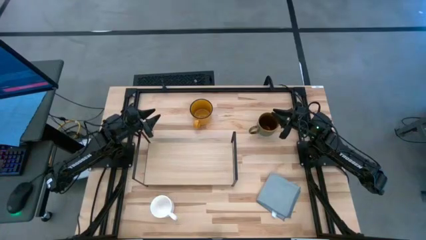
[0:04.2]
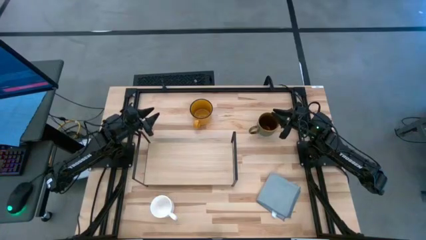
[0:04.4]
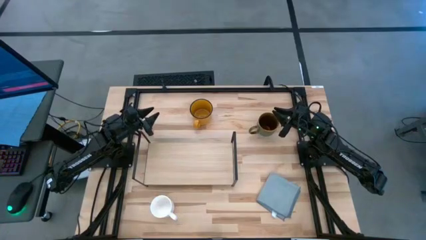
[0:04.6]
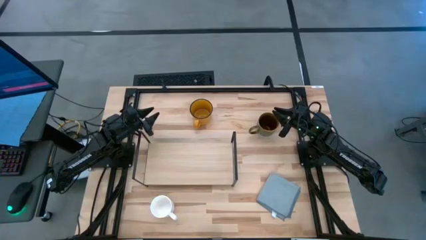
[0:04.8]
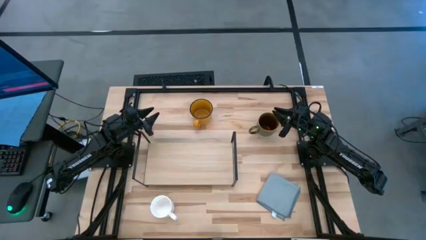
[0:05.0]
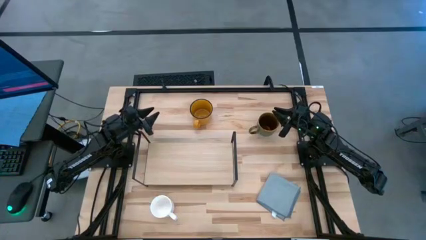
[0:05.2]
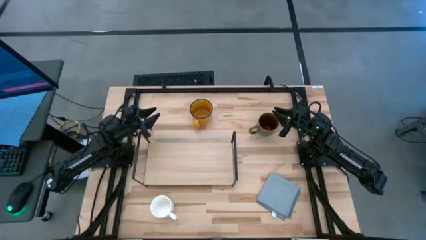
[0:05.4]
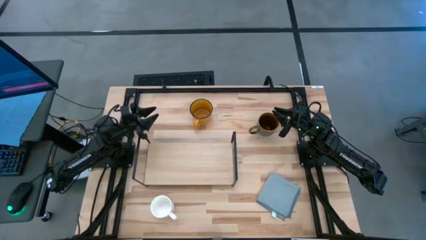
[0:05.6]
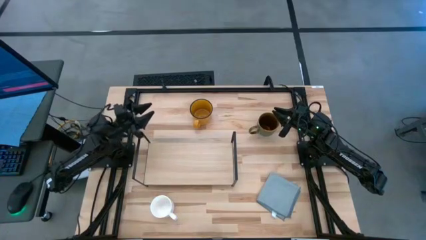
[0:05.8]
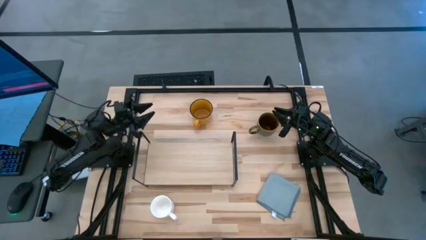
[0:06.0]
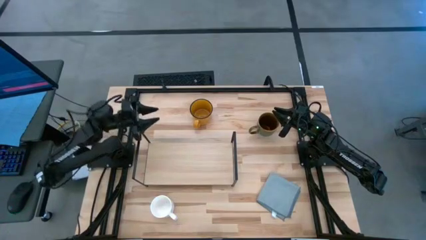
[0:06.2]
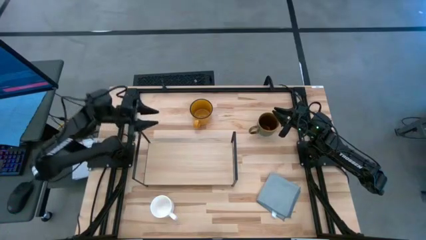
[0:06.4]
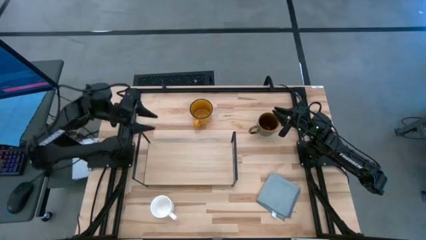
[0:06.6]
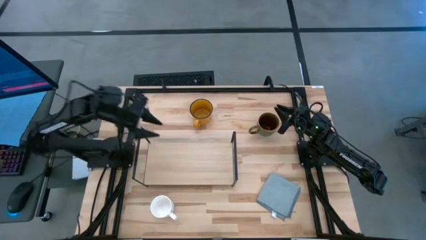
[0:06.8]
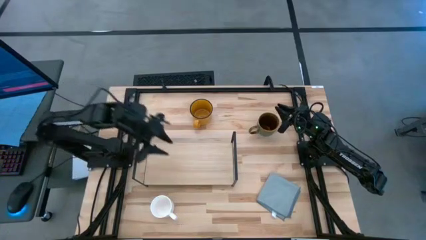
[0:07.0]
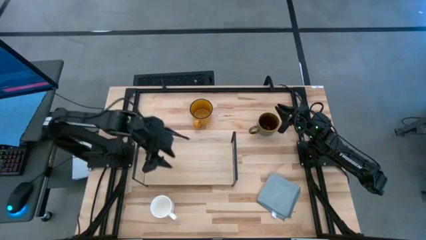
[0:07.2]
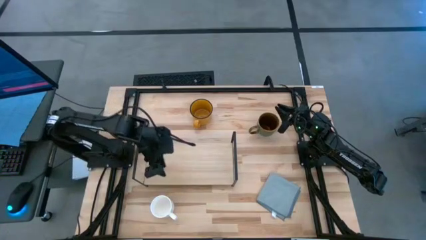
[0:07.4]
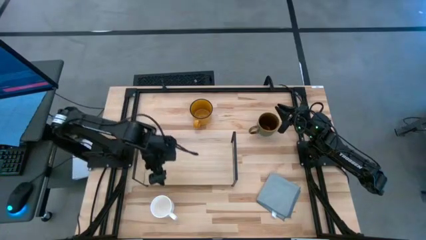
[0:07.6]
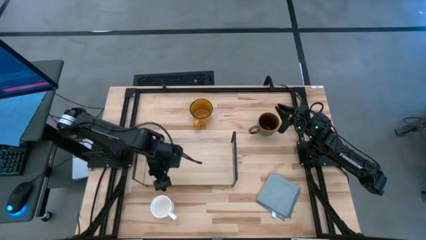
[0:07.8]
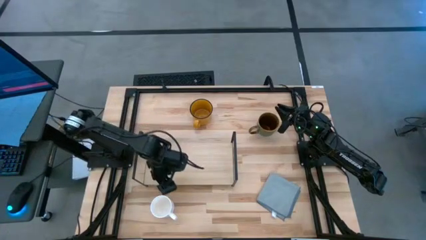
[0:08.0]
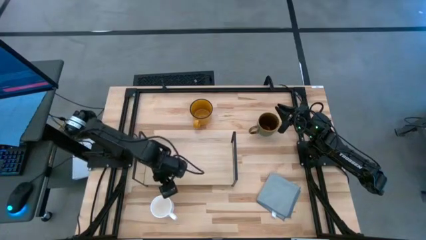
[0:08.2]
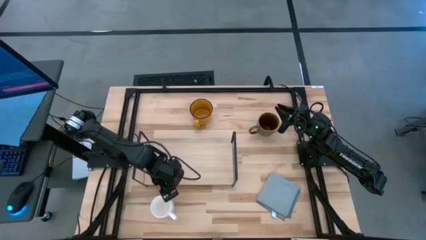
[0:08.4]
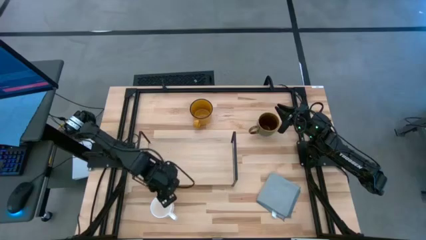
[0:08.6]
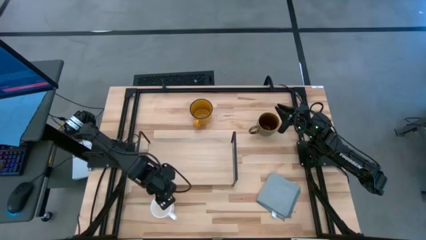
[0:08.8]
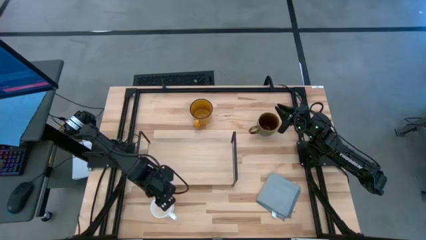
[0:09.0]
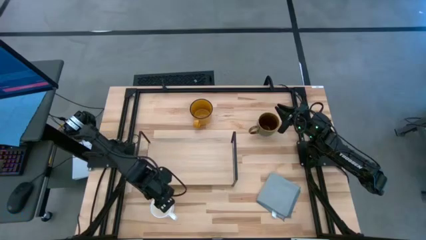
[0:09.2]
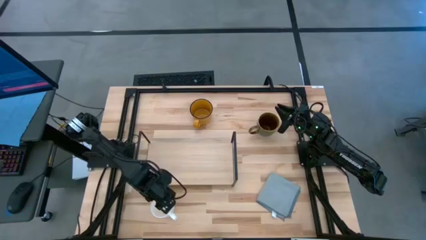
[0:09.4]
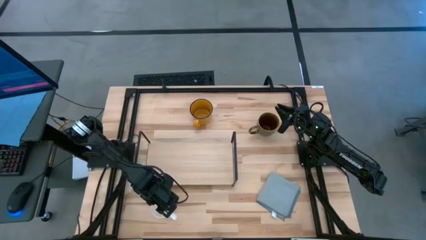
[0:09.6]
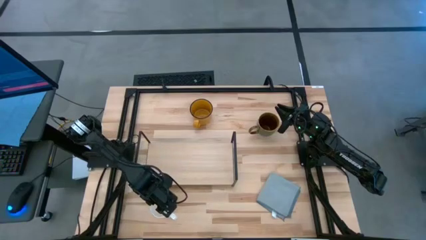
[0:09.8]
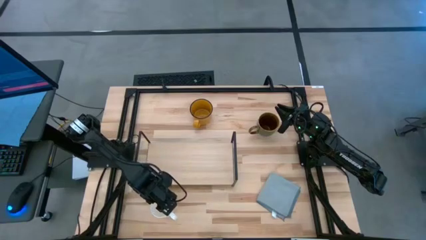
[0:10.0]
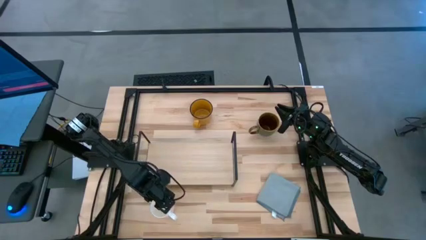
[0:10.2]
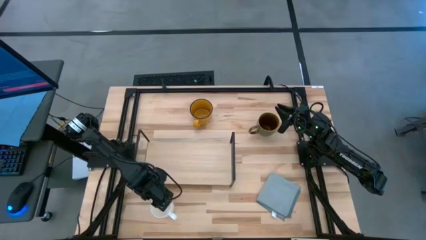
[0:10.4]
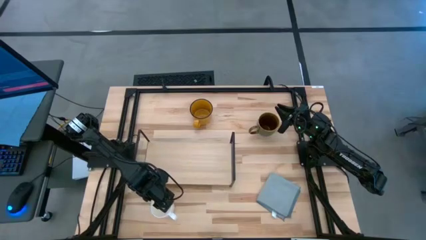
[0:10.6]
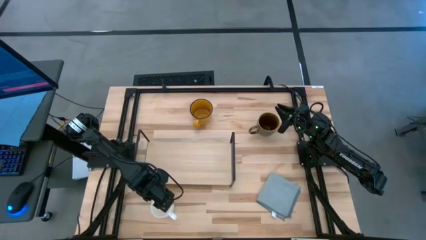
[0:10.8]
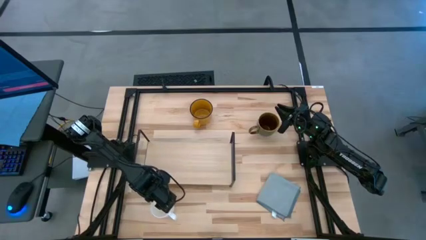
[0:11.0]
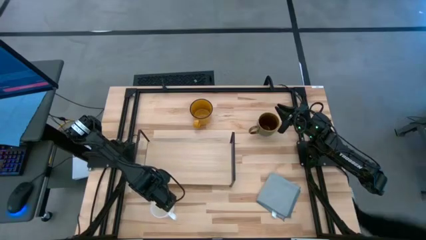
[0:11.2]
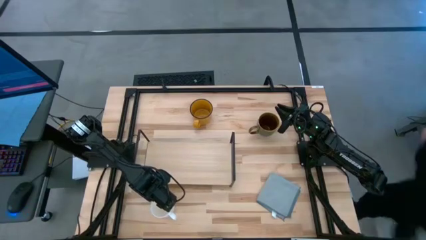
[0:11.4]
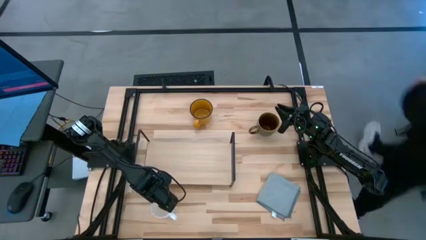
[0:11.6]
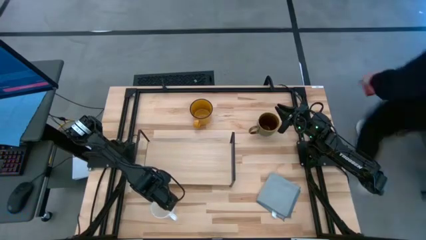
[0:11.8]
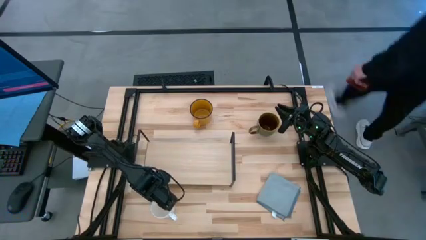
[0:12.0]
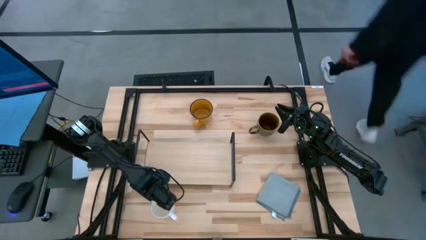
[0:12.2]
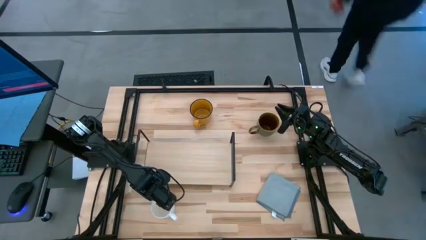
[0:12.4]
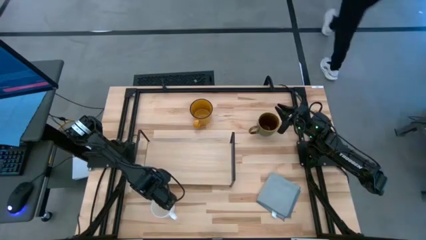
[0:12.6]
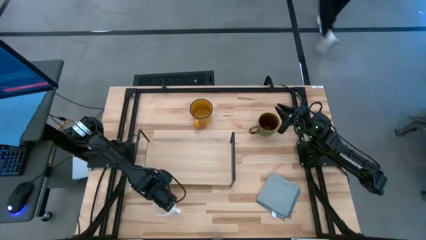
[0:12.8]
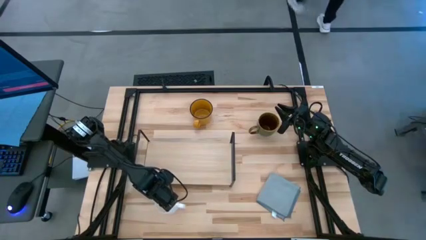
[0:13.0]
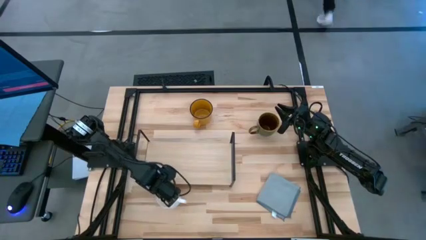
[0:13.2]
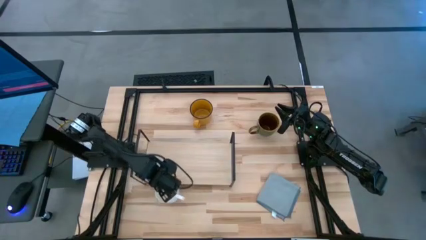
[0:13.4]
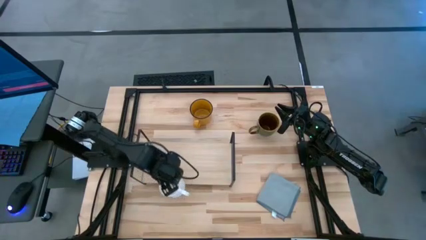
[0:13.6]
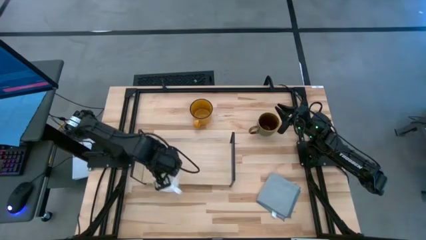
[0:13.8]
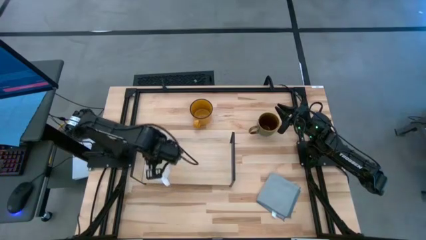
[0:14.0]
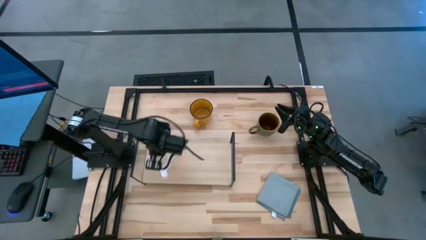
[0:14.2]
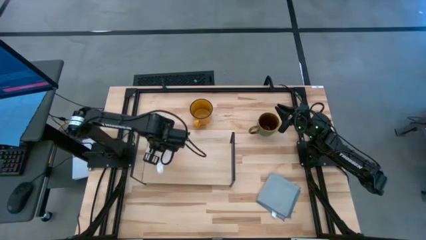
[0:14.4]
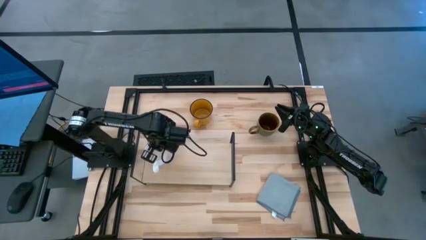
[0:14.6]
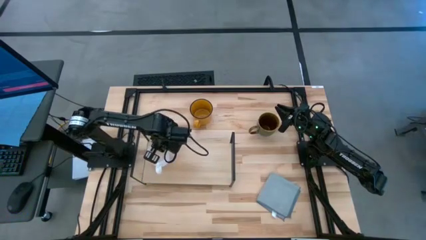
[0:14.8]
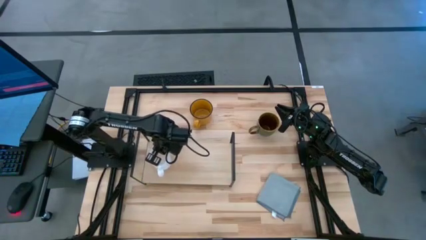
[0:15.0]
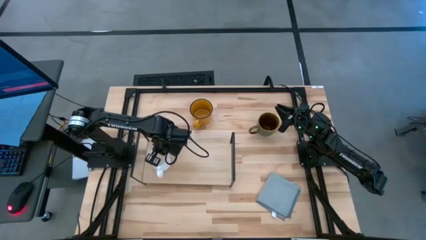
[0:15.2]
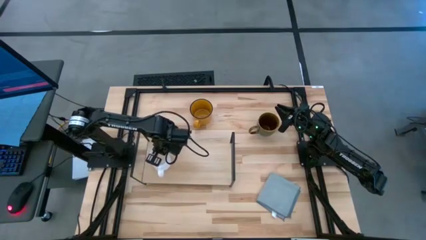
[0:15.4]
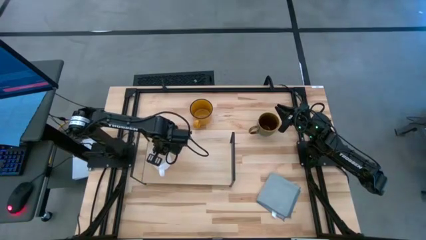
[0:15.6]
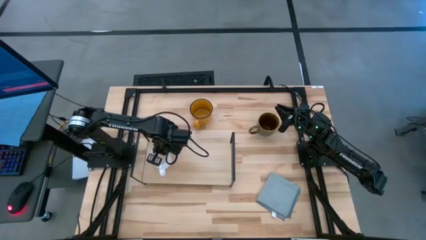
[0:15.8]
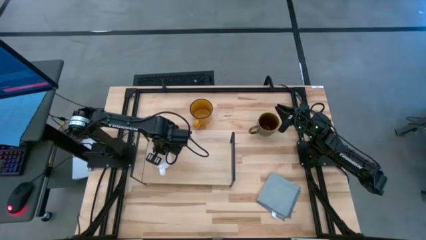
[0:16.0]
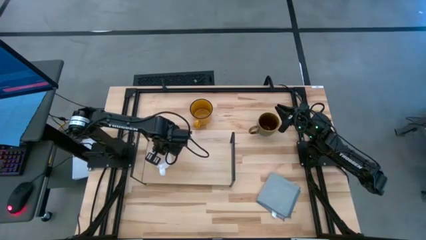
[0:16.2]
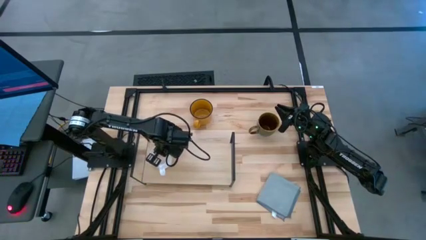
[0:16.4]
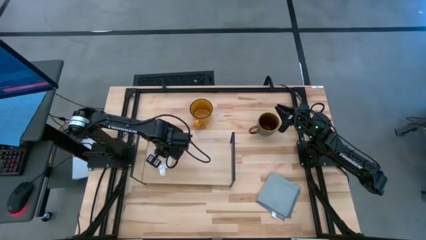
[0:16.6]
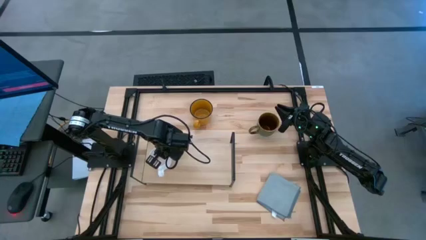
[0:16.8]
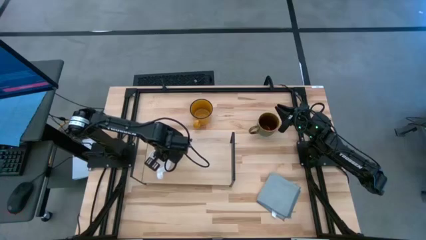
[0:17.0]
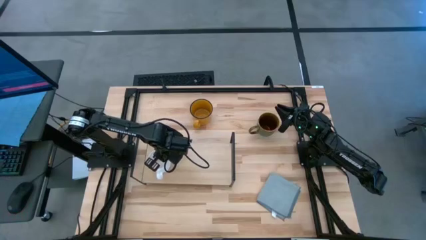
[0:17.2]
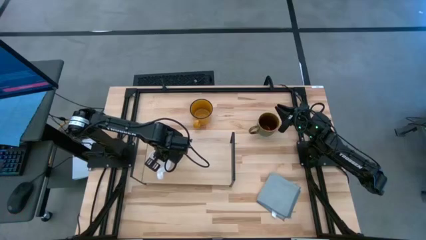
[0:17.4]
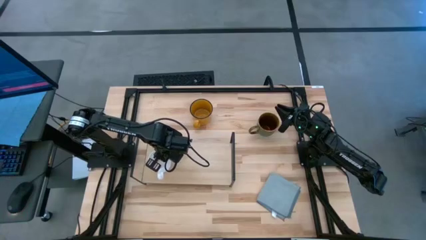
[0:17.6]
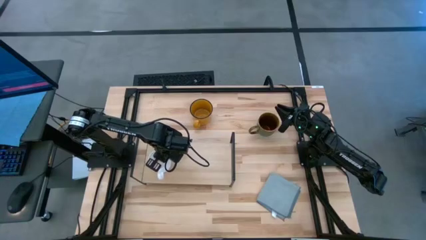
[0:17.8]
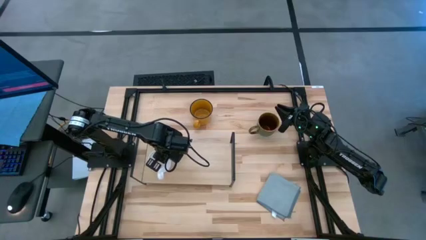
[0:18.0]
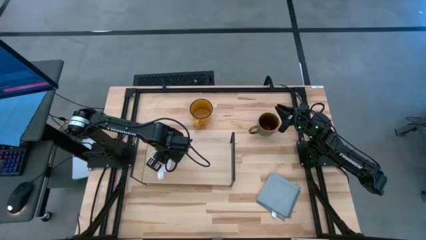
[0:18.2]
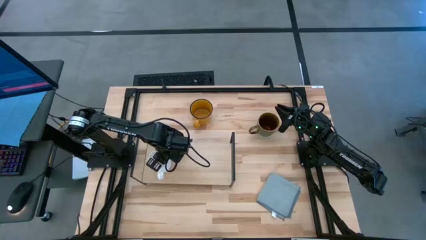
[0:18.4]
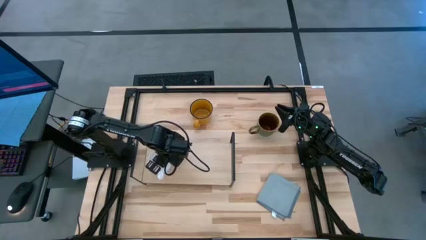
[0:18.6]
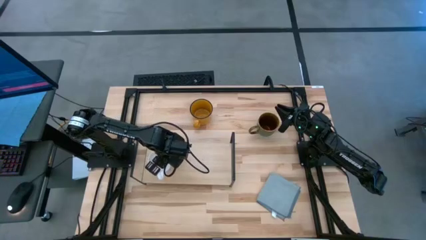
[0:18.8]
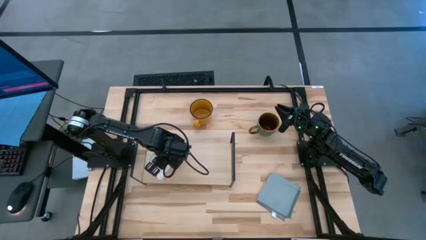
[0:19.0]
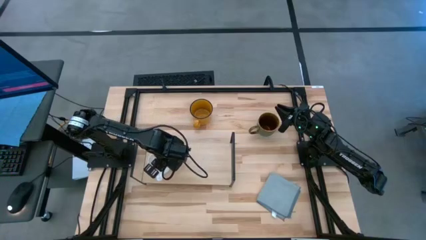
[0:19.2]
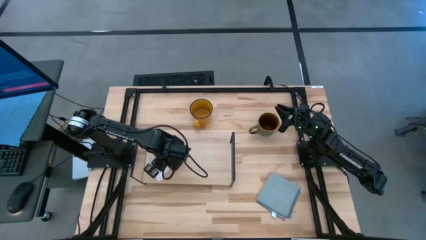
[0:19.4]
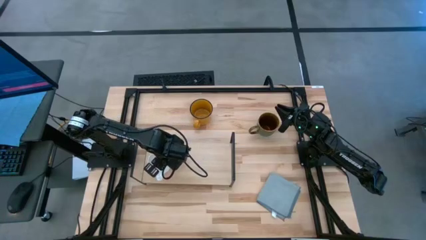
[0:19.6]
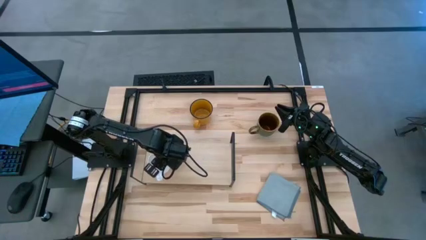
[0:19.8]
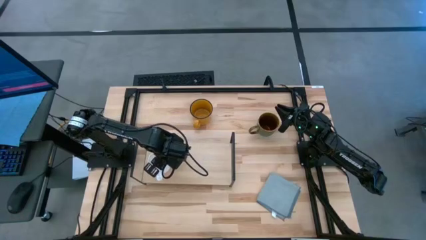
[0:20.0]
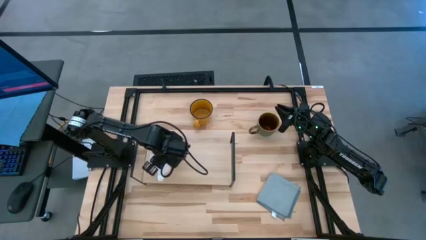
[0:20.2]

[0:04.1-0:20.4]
Task: Stack small to large cups/mugs on shelf
Put the white mug on the shelf
